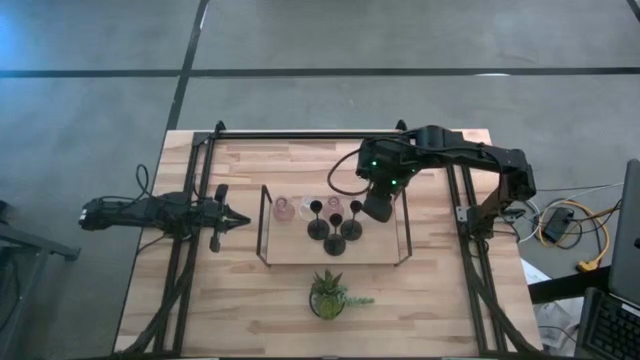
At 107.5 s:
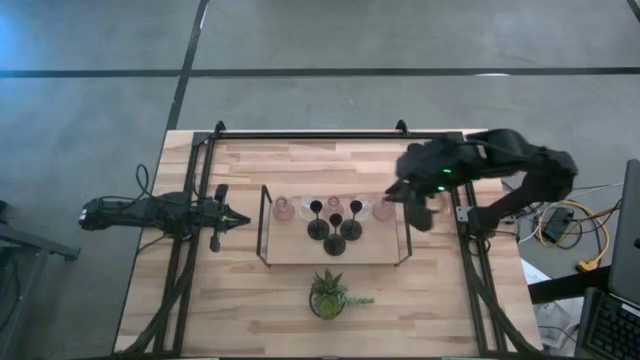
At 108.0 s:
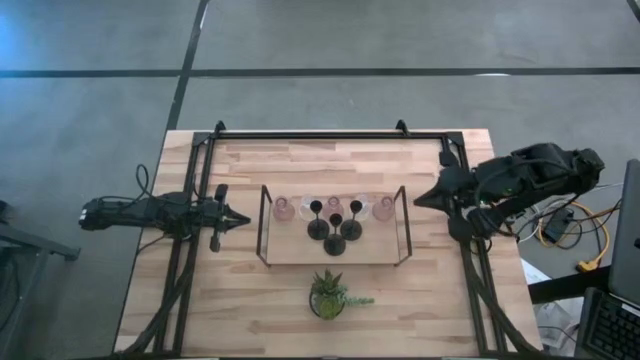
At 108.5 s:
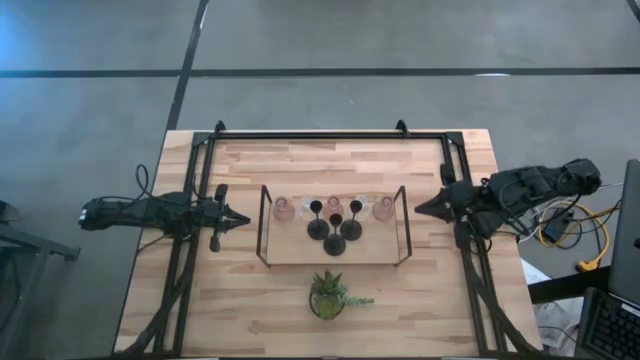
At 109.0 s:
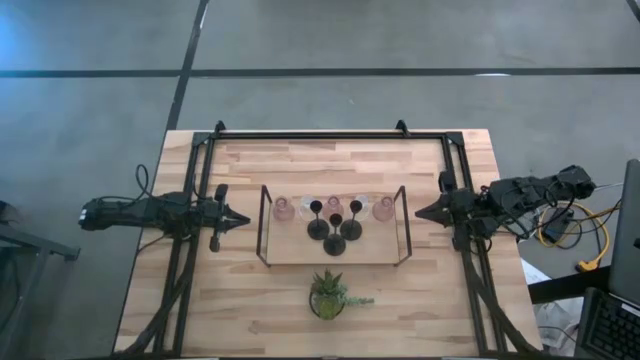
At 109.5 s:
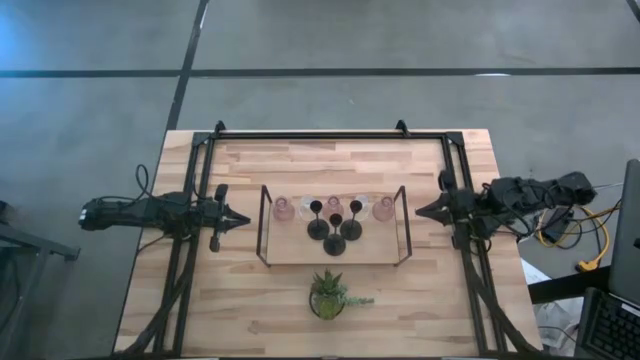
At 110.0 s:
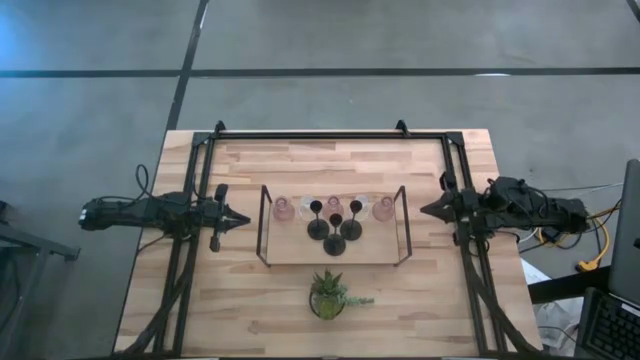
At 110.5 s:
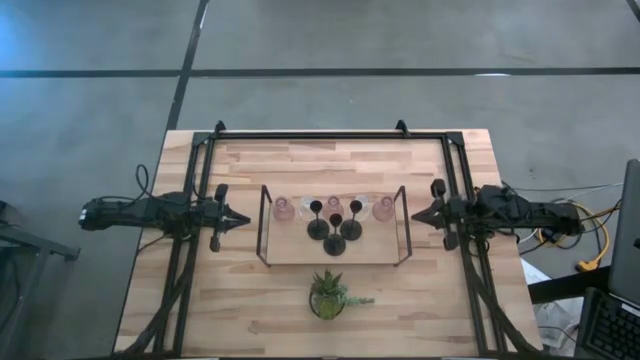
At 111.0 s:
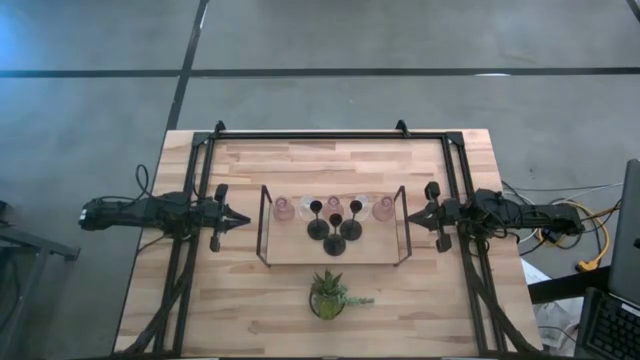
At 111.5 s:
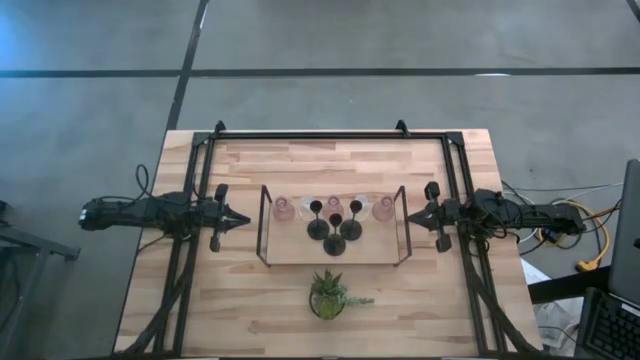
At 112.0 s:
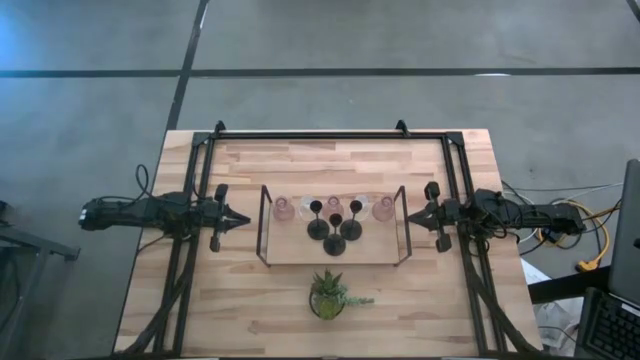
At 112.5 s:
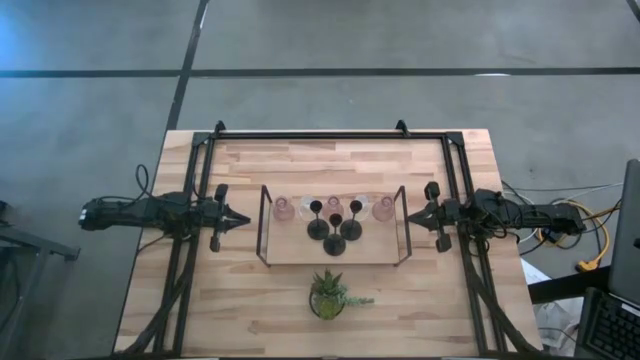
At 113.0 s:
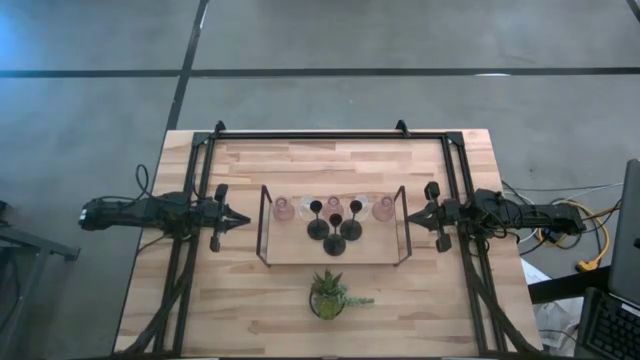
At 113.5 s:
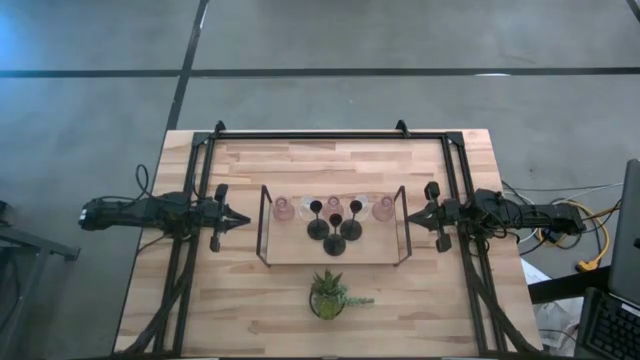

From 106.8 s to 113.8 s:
Task: Pick & Place candle stick holders
Return to Home Position

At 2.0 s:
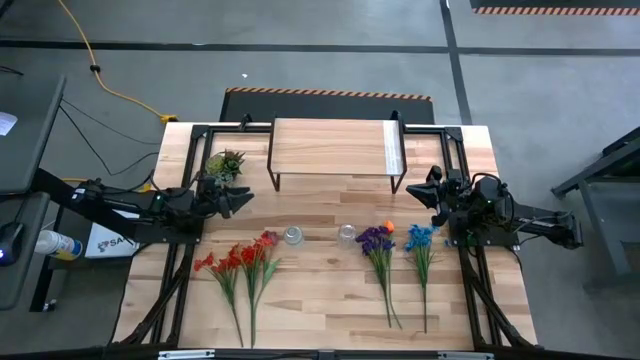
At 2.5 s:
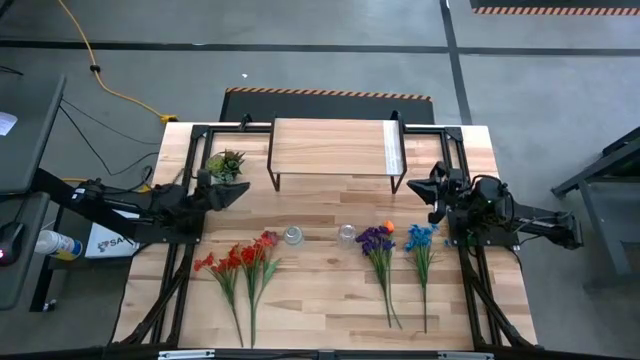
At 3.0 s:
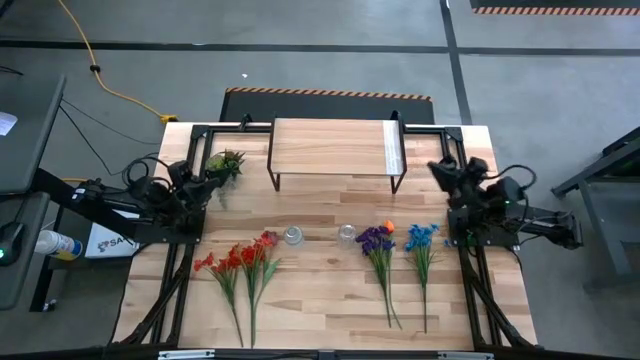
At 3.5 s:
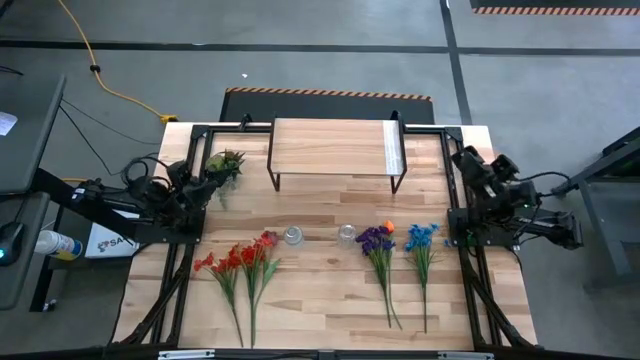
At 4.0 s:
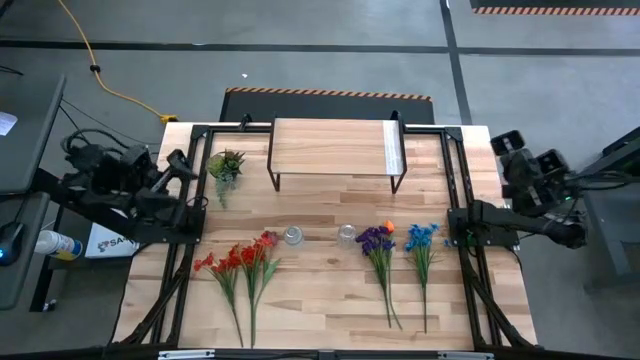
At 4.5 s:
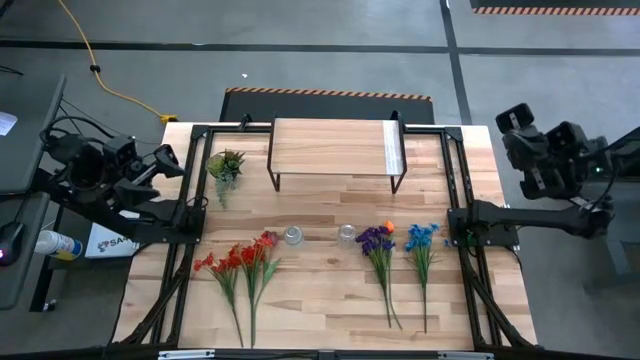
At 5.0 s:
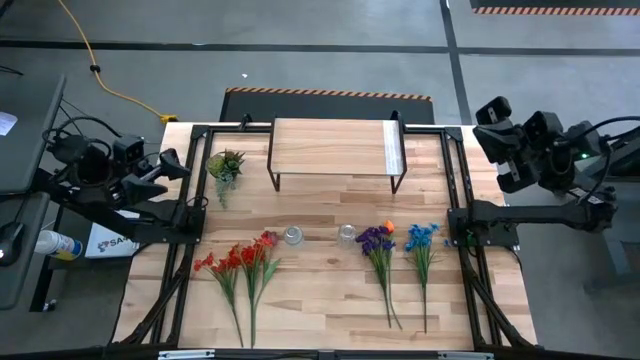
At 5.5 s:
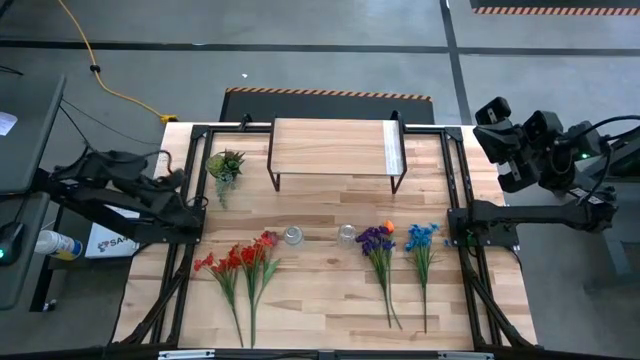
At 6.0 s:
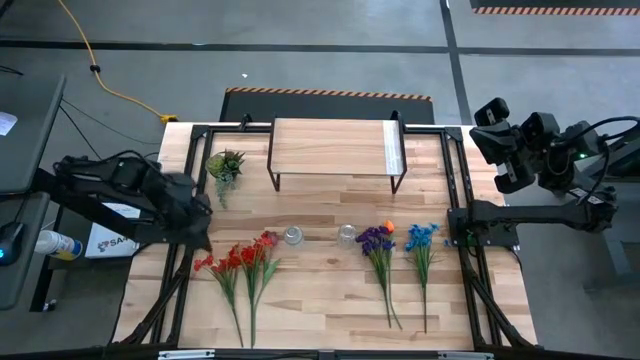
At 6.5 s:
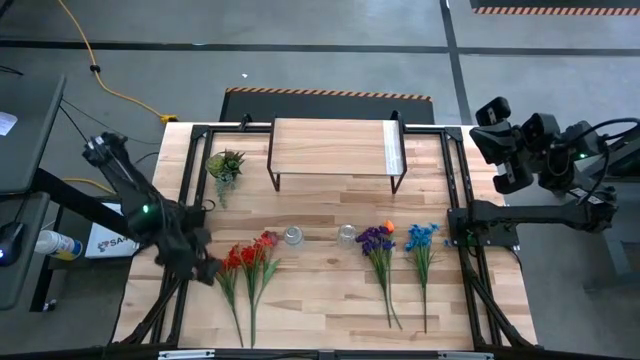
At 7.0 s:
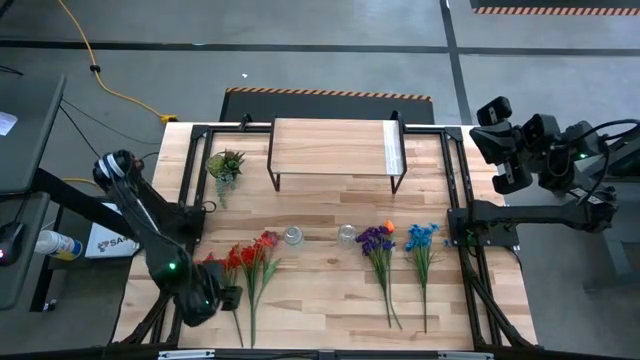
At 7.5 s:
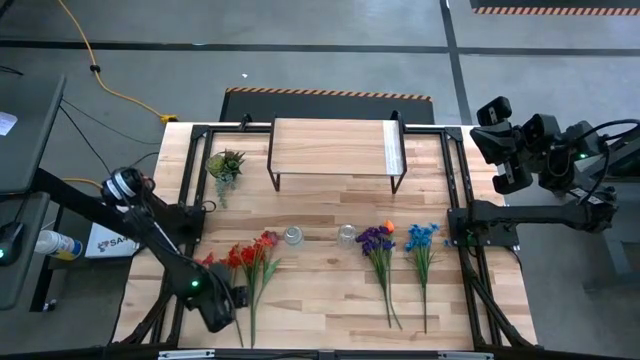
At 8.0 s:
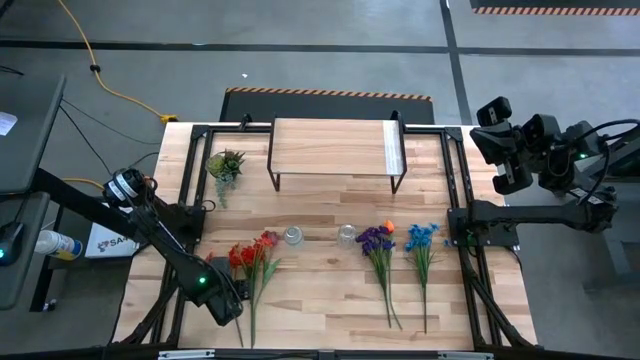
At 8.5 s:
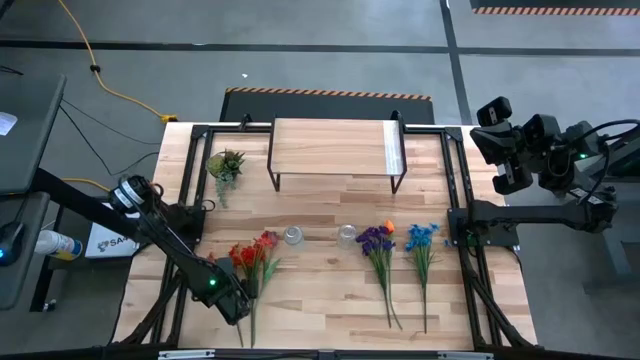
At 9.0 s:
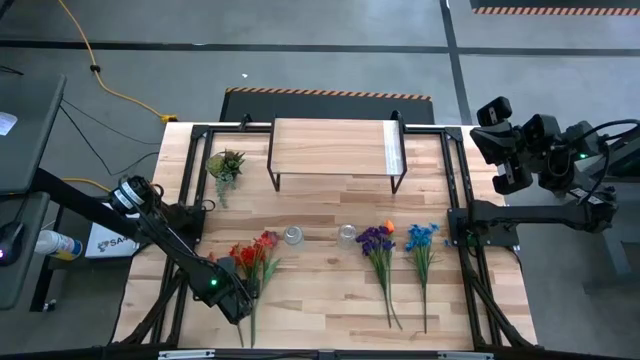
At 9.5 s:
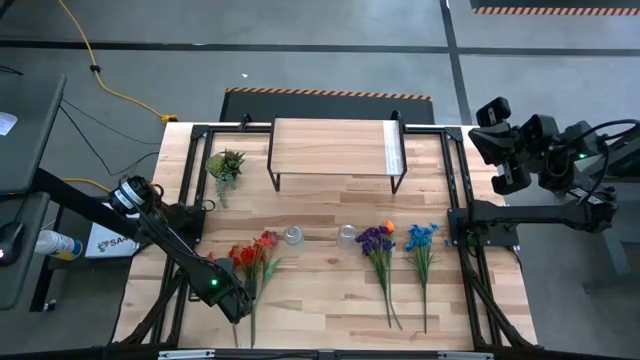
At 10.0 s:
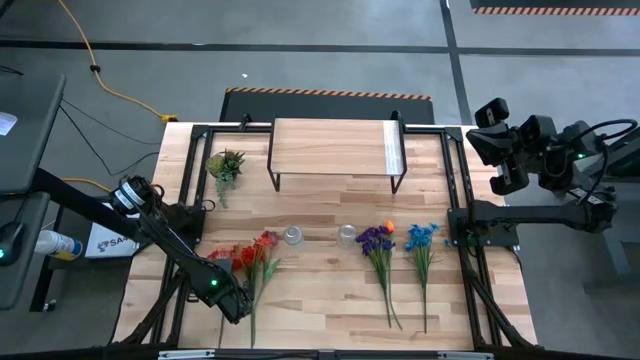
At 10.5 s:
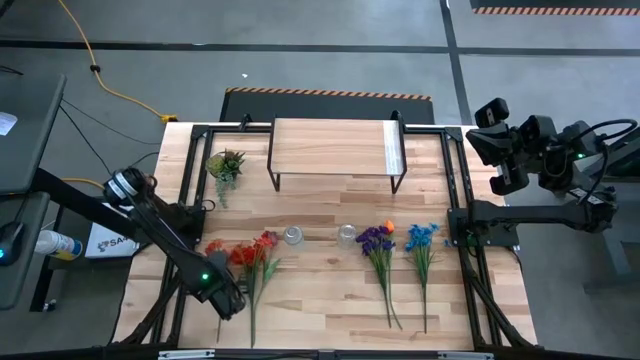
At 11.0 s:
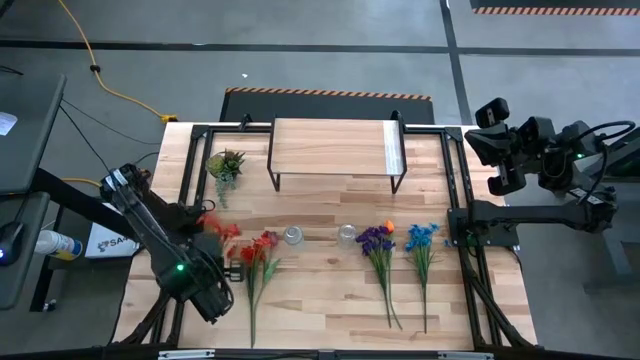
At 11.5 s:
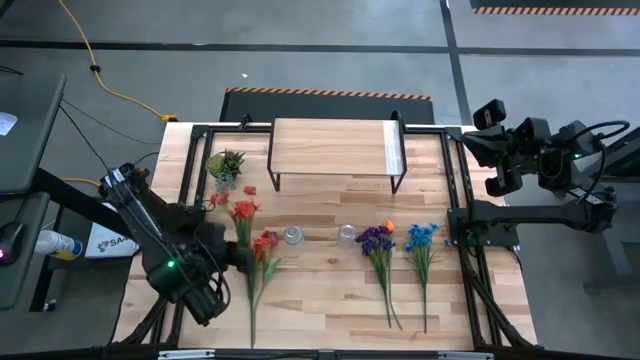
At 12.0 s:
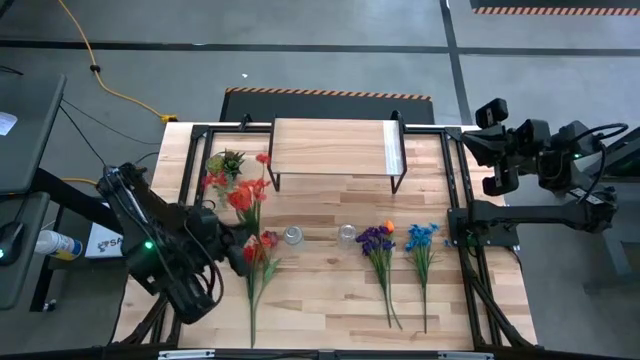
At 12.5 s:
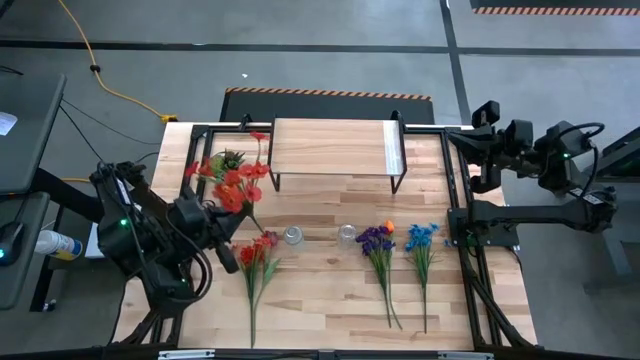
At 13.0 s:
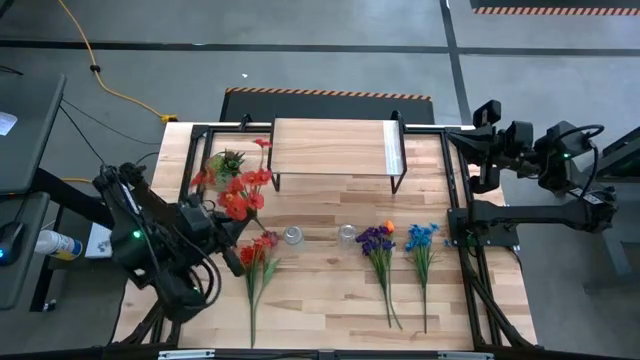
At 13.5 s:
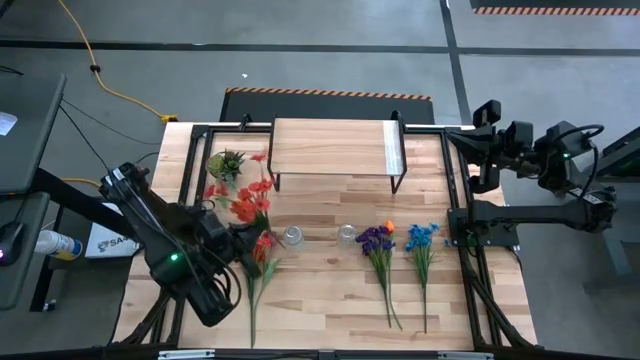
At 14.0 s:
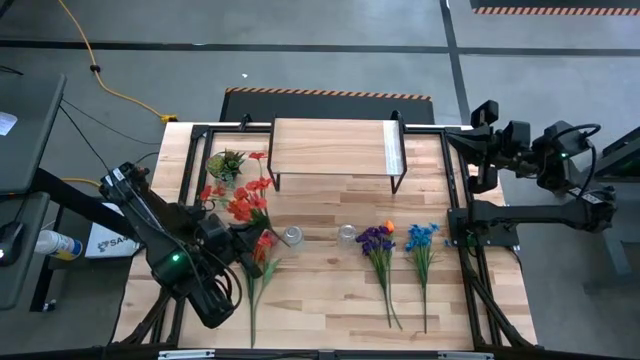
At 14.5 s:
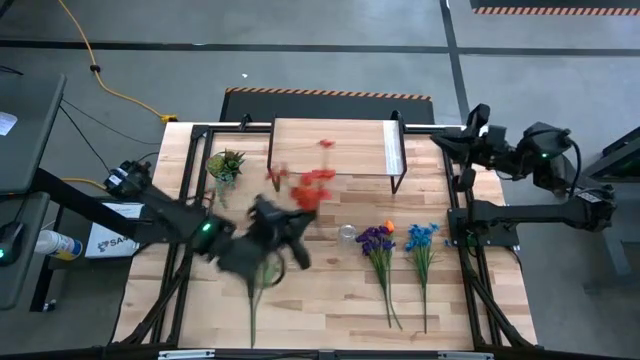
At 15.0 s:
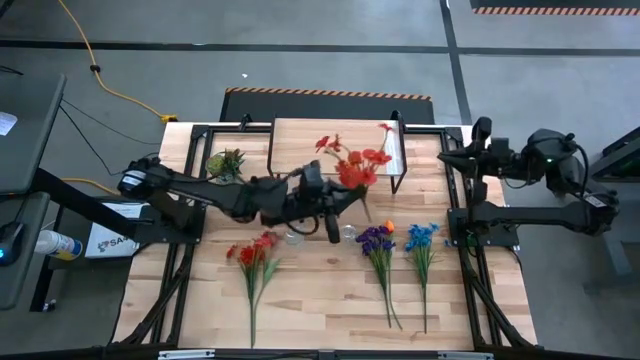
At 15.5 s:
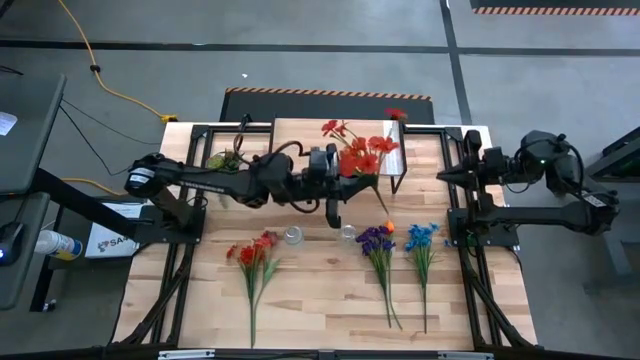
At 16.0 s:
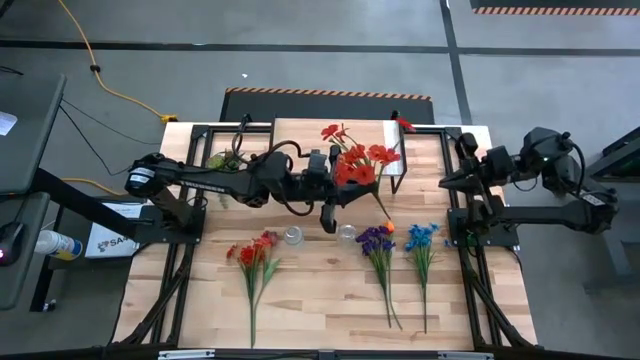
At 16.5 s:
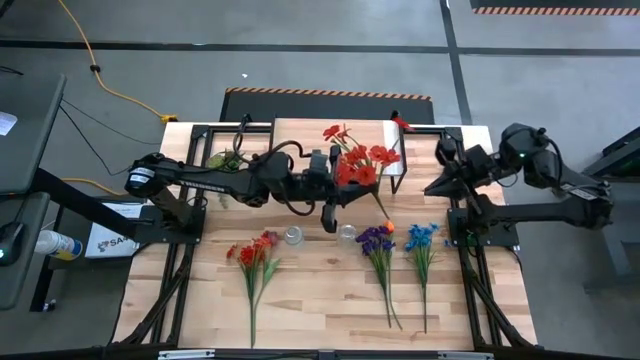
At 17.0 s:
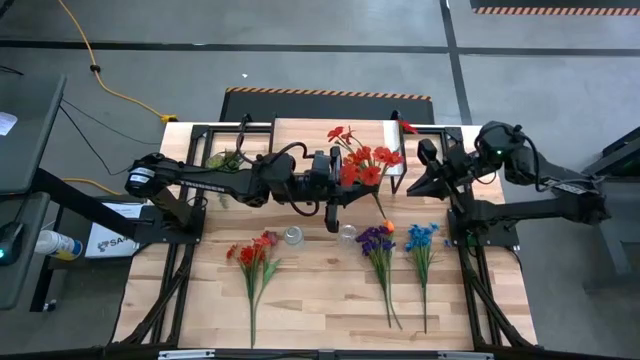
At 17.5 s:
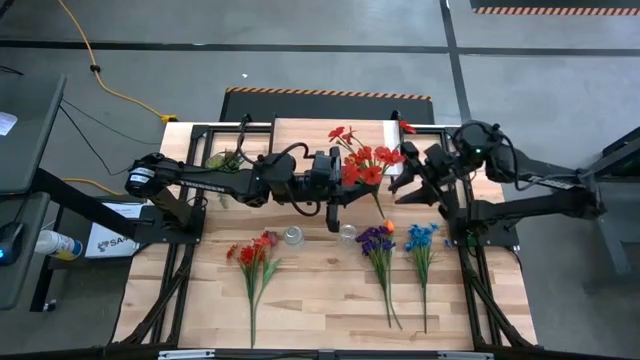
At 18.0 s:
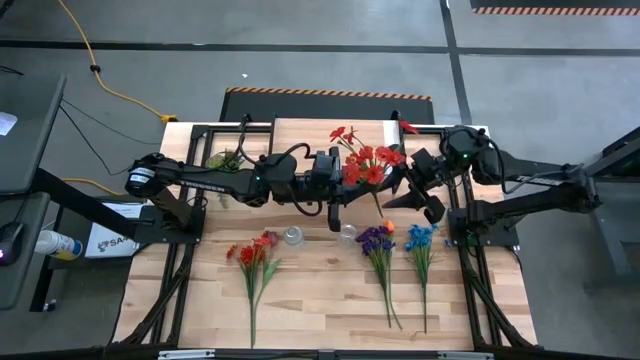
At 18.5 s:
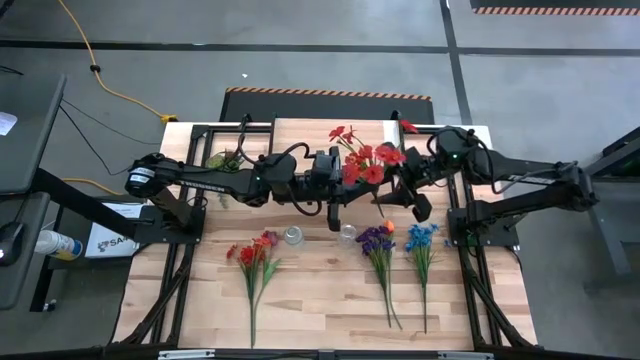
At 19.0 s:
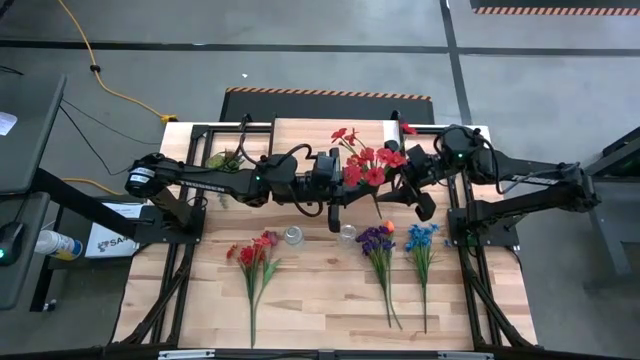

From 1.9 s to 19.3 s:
Task: Pick and place flowers into a vace then onto a shelf
Put the left orange flowers into the right transparent vase
